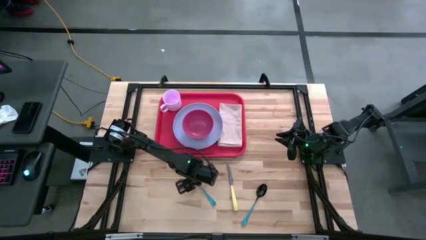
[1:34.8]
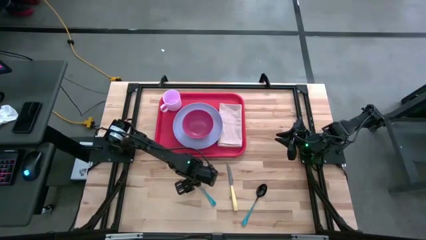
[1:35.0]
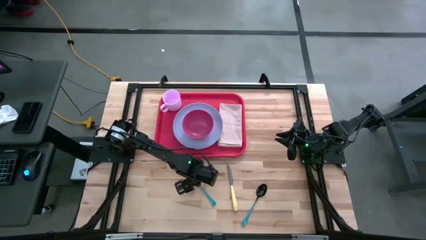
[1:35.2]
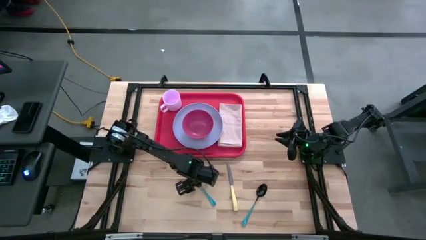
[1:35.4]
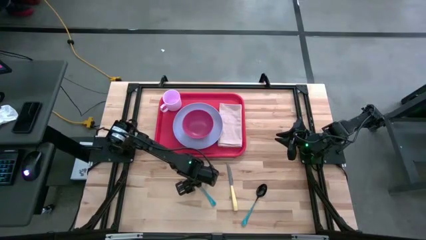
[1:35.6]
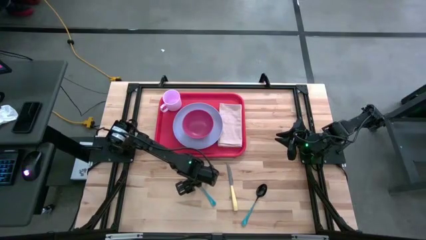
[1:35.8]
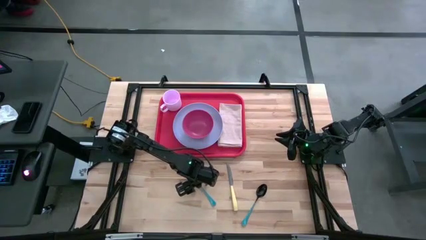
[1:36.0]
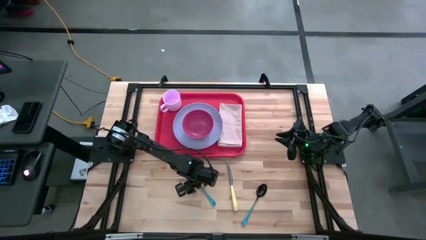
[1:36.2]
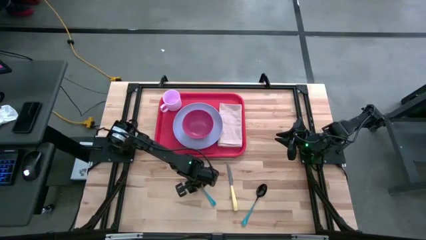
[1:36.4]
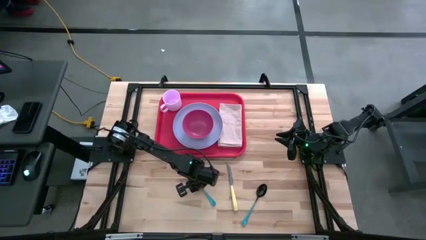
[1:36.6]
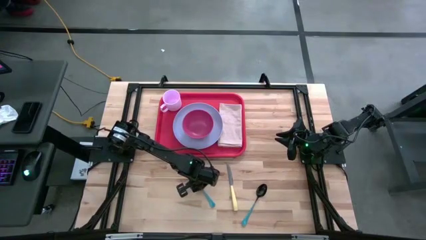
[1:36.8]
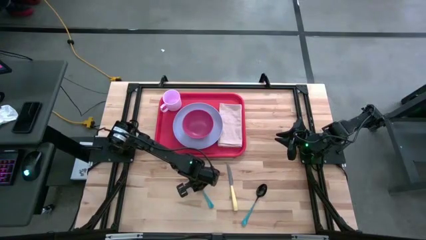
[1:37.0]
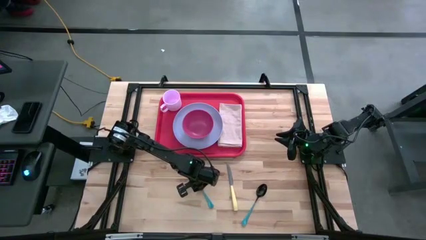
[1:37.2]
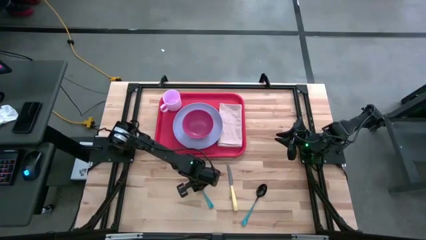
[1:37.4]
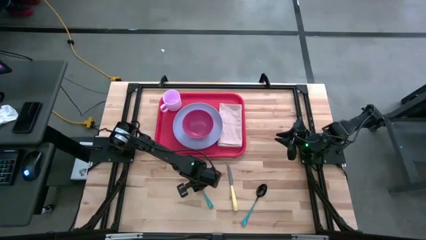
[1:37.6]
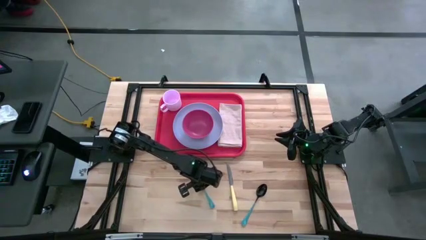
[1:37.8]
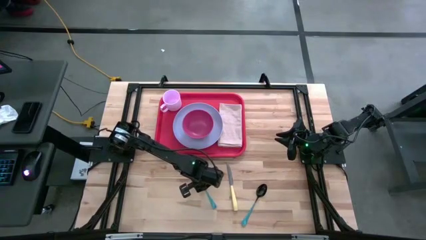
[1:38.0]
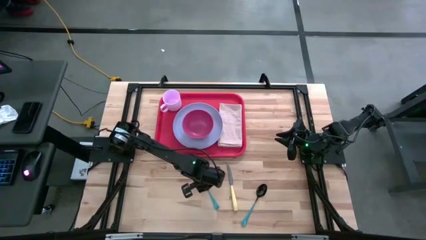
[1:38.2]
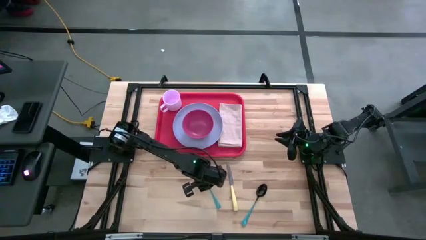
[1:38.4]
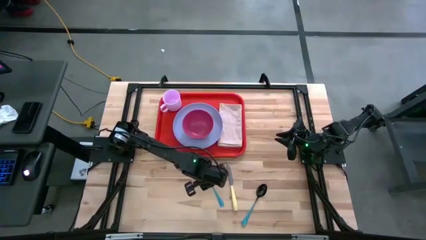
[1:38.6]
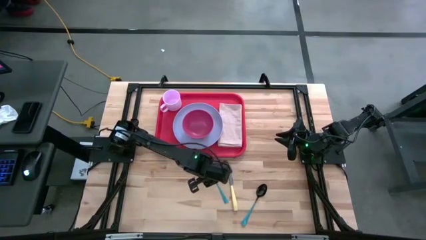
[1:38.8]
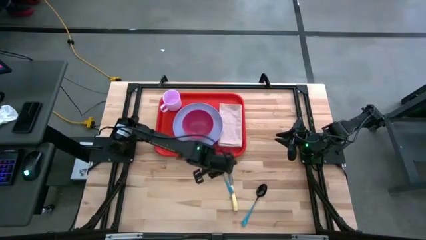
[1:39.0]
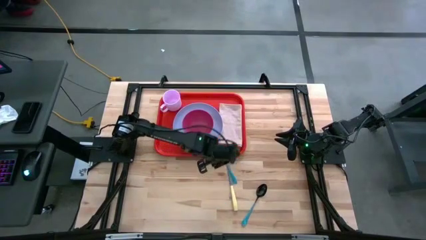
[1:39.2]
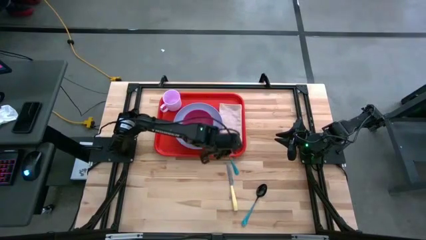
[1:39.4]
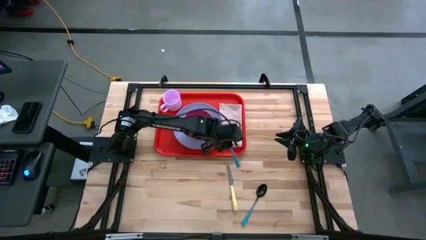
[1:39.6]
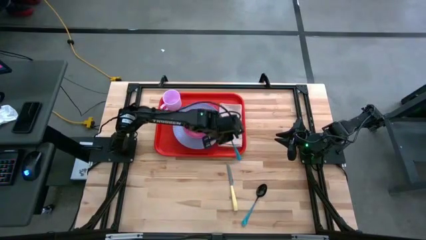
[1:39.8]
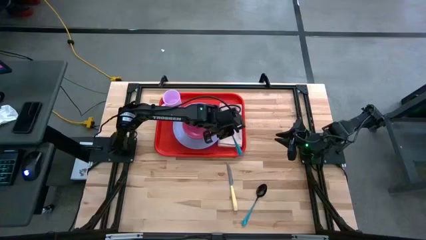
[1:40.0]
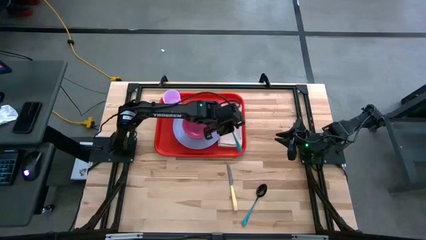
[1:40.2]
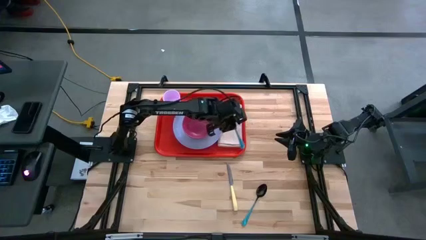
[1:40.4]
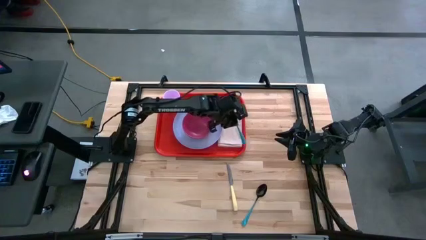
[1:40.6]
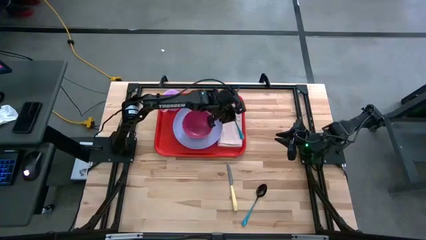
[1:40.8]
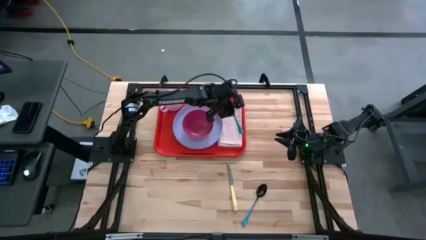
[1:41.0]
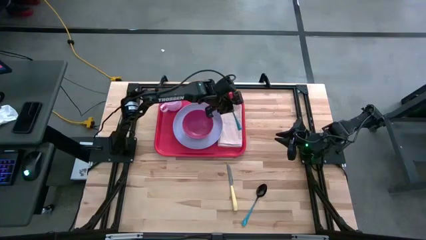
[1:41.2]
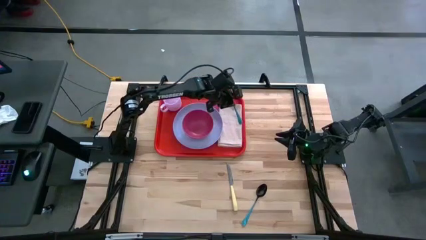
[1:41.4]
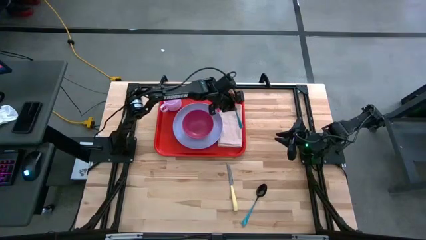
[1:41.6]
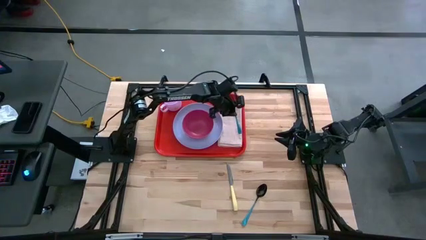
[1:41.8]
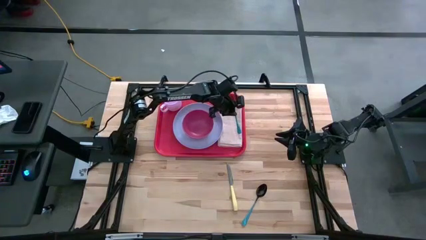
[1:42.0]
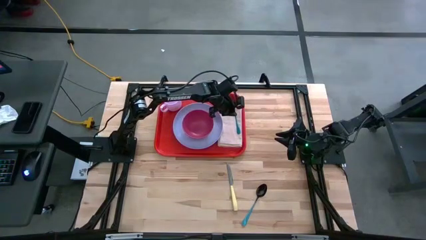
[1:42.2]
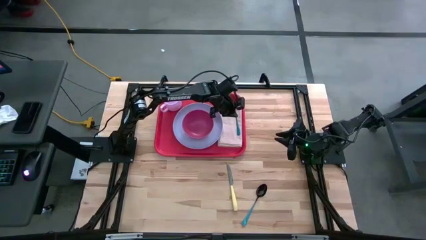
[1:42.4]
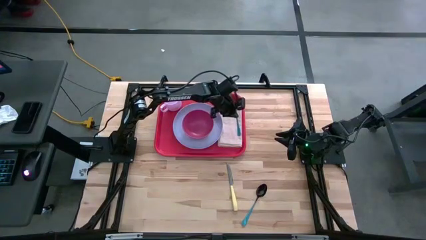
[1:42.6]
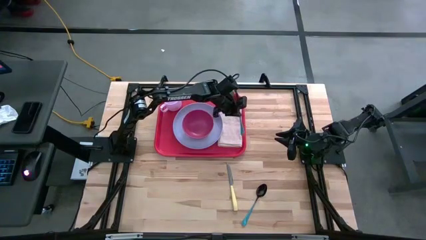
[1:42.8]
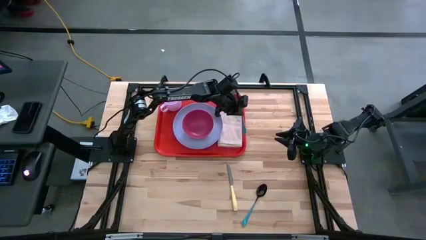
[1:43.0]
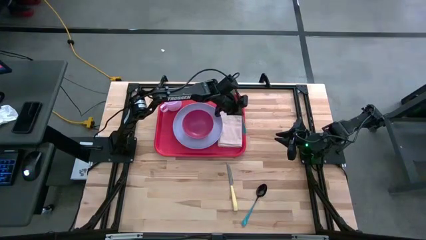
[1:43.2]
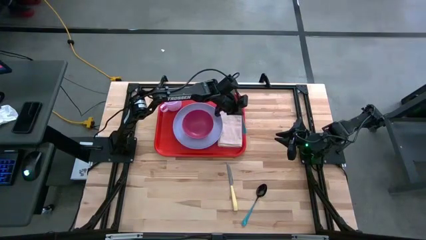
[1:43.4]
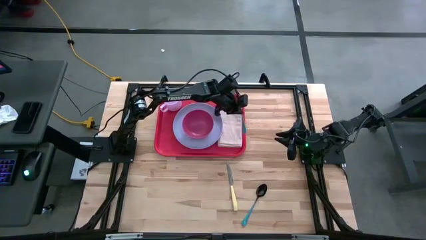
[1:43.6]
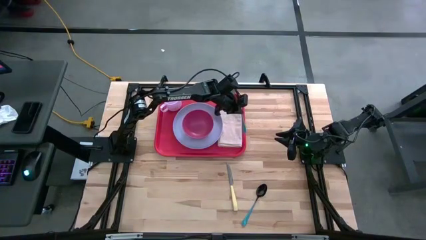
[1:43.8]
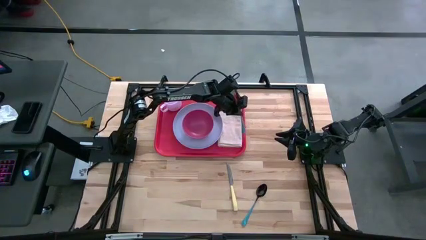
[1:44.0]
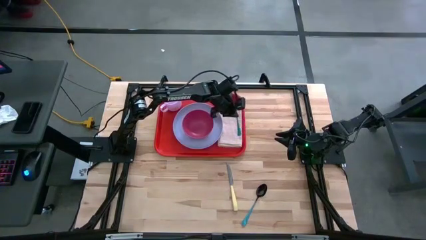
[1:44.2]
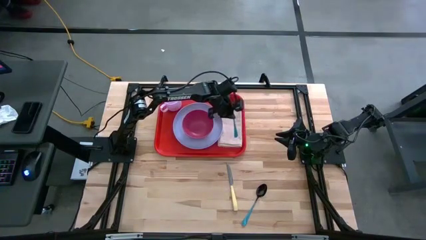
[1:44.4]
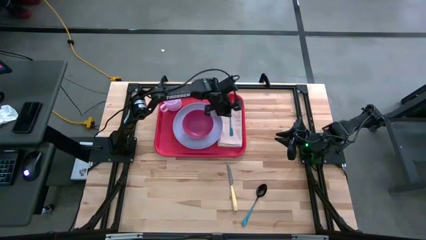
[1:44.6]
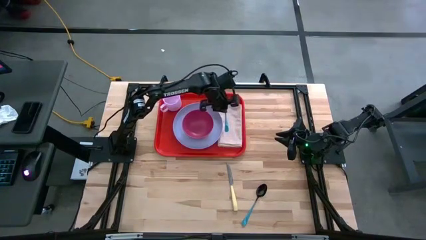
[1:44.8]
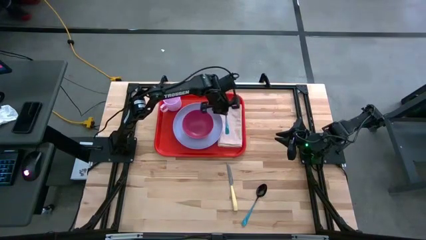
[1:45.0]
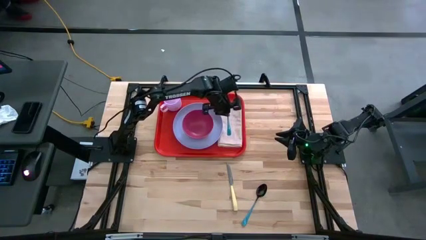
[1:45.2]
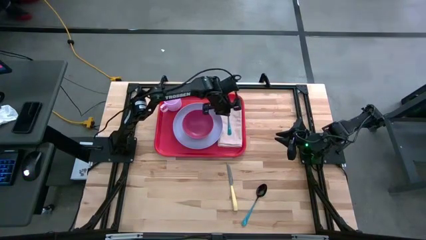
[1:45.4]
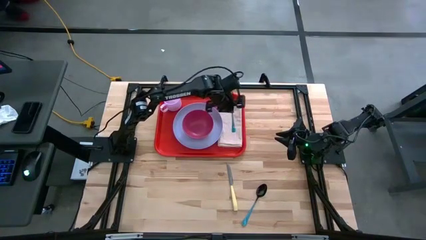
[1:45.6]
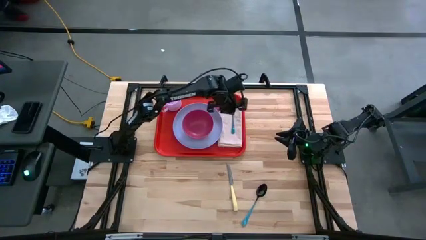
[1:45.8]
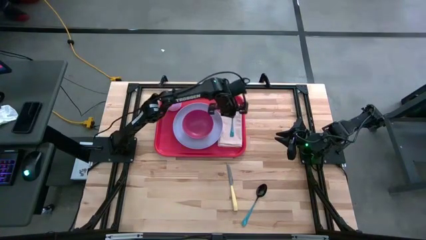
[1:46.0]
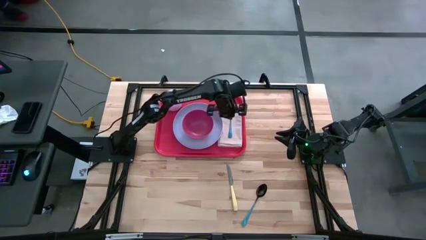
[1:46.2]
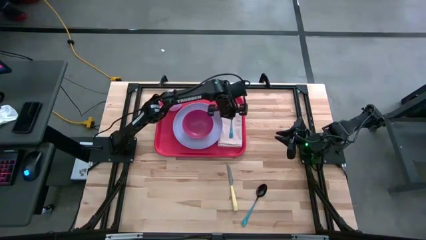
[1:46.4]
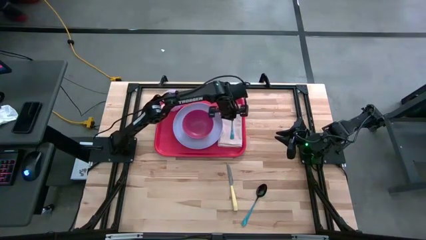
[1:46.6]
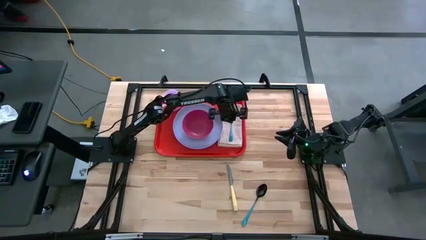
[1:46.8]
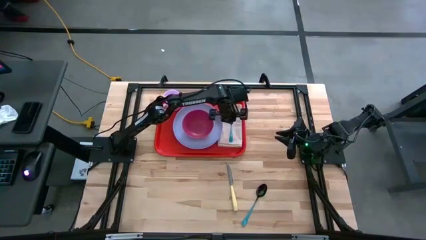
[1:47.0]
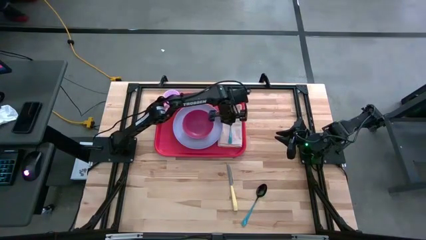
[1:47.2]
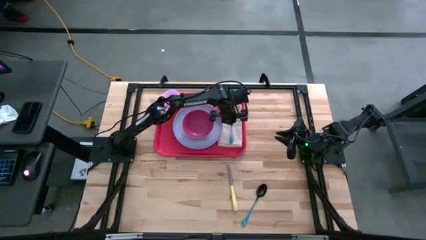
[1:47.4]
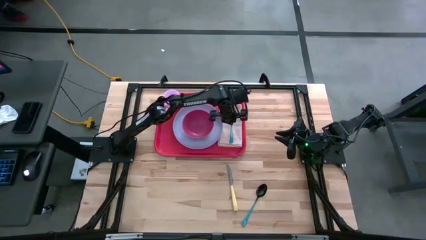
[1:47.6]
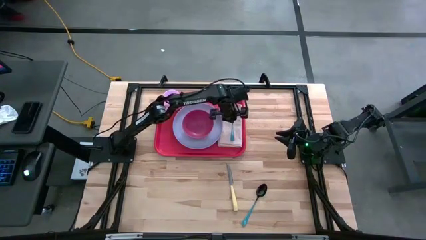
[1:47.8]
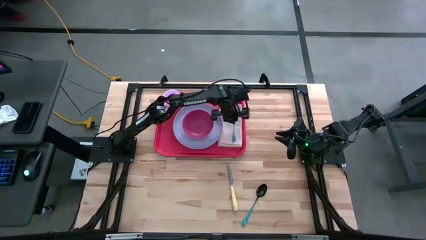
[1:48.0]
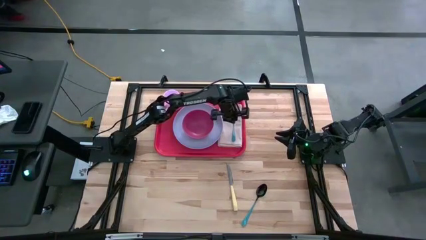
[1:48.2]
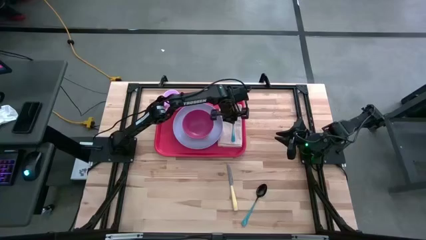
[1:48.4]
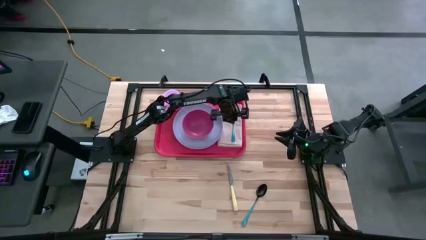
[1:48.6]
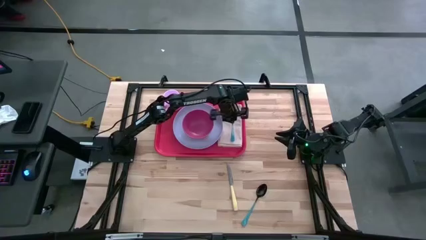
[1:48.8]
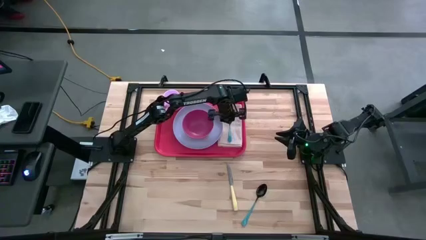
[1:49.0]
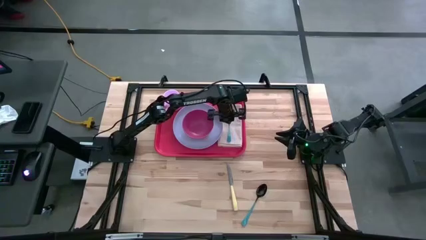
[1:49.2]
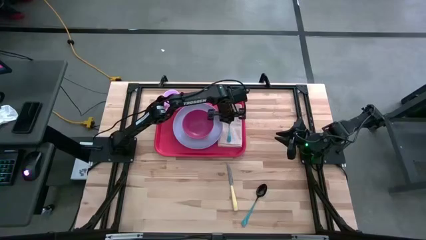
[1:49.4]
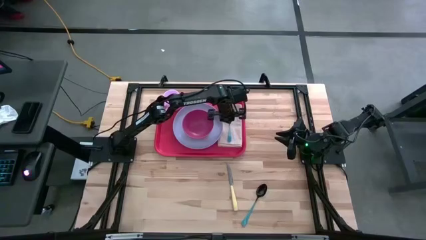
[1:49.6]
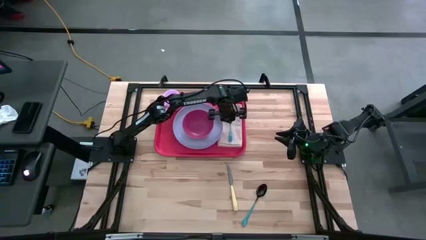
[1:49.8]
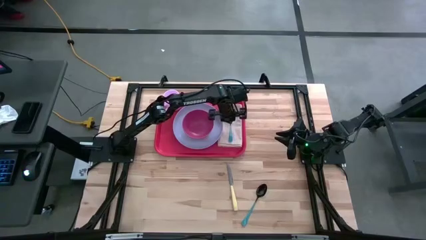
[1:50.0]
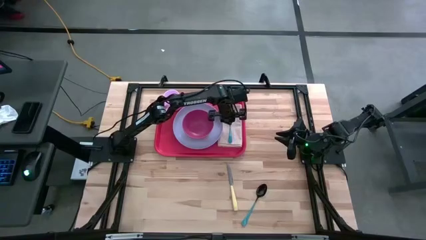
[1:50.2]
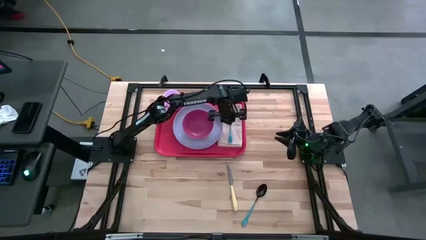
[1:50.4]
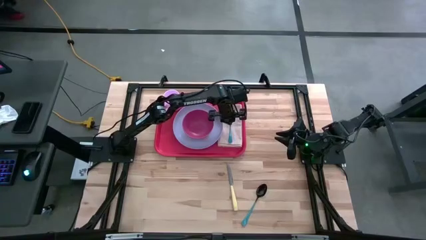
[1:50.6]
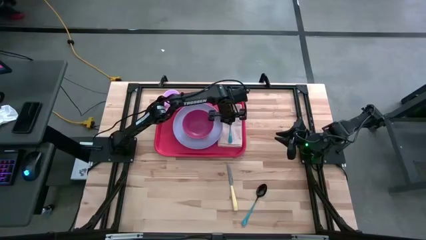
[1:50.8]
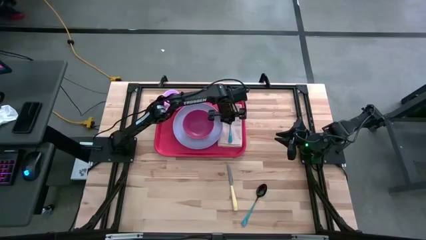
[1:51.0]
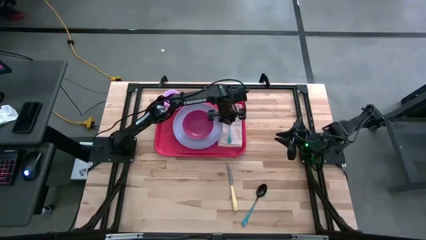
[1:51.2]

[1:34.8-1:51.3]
Task: Set up tray
Put the blue fork on the white table napkin to the right of the purple plate
